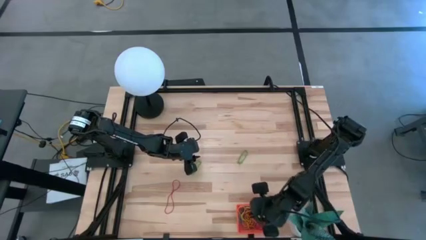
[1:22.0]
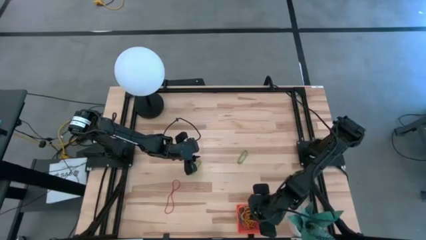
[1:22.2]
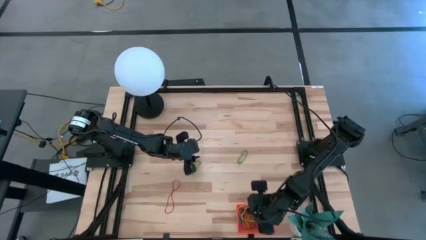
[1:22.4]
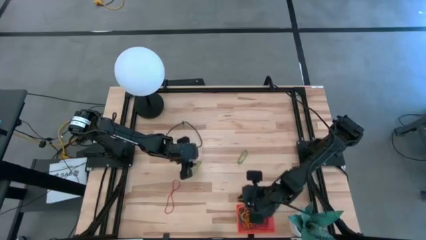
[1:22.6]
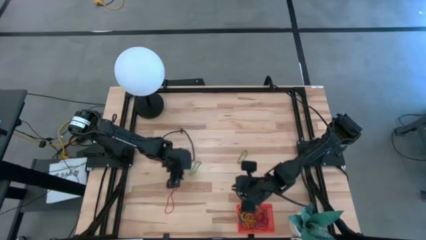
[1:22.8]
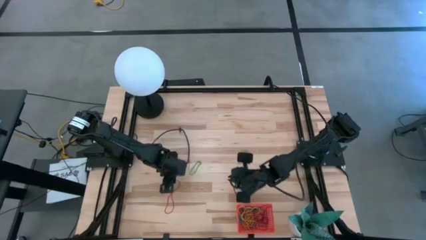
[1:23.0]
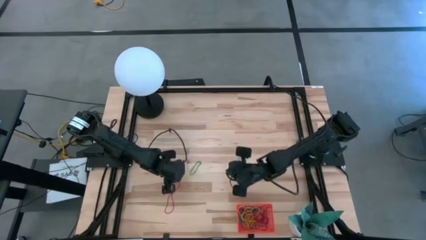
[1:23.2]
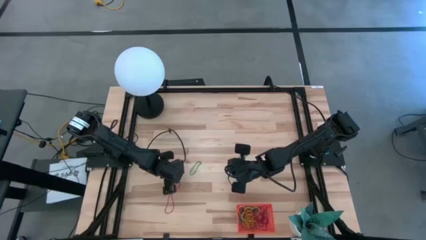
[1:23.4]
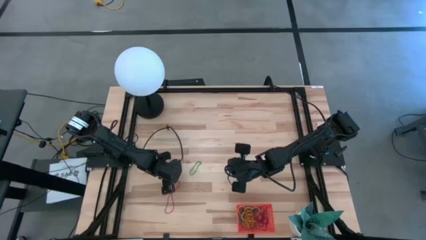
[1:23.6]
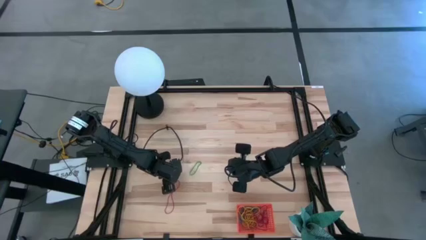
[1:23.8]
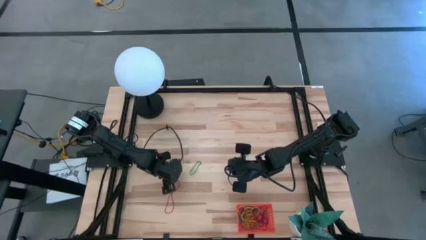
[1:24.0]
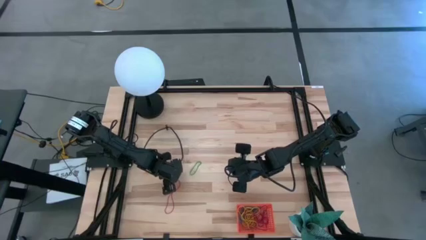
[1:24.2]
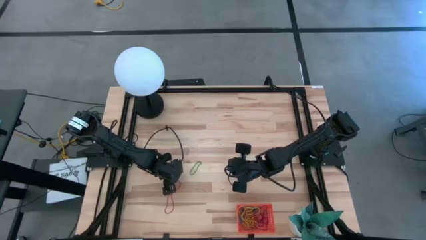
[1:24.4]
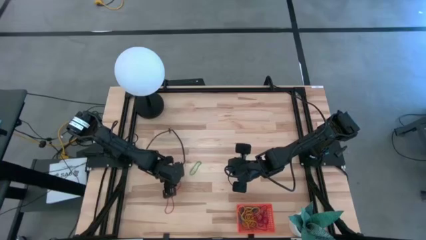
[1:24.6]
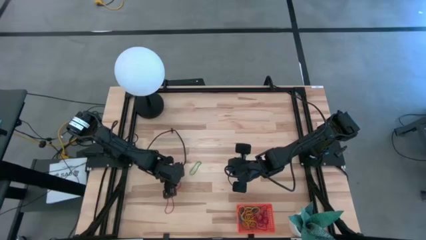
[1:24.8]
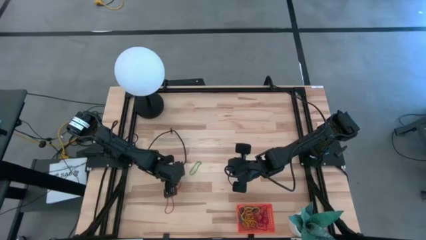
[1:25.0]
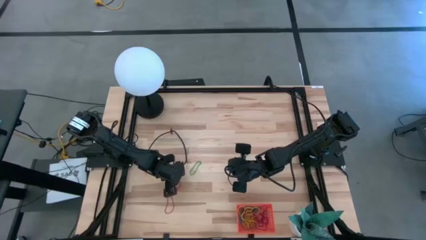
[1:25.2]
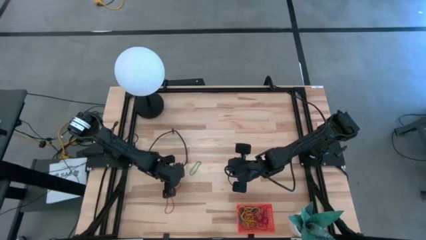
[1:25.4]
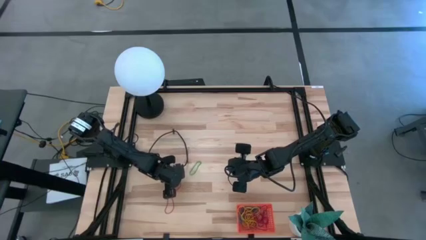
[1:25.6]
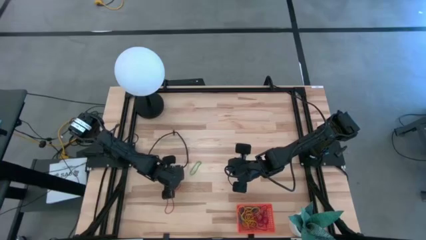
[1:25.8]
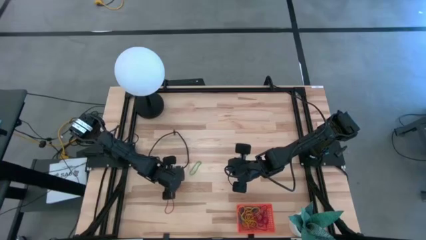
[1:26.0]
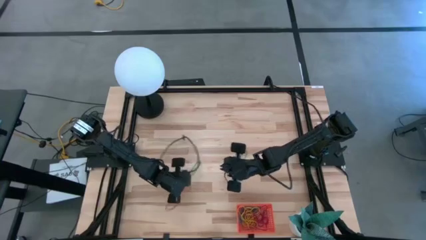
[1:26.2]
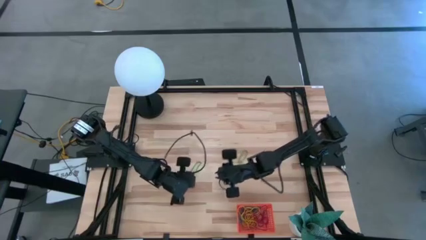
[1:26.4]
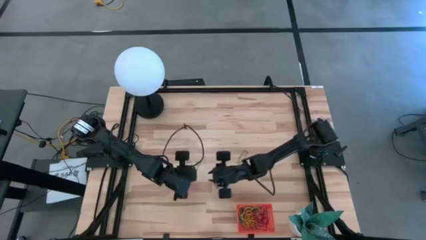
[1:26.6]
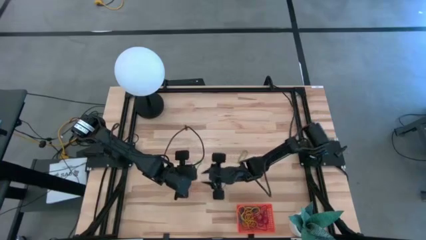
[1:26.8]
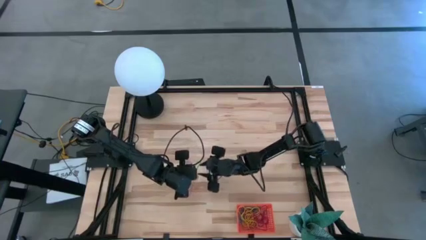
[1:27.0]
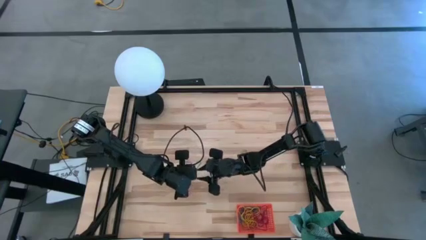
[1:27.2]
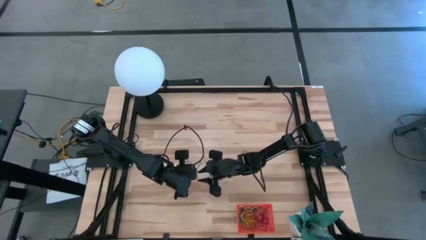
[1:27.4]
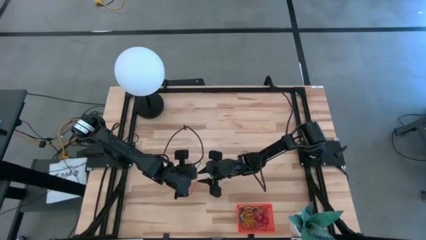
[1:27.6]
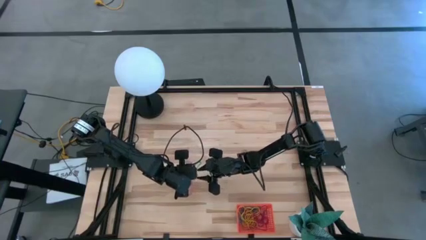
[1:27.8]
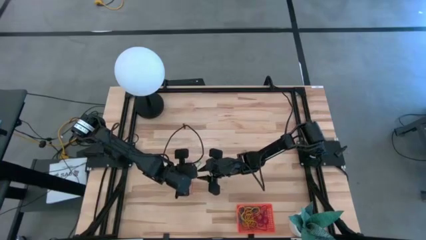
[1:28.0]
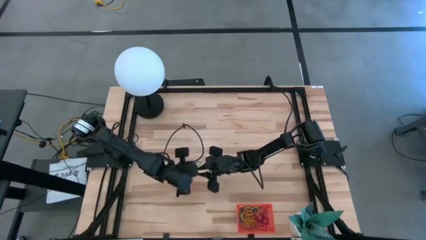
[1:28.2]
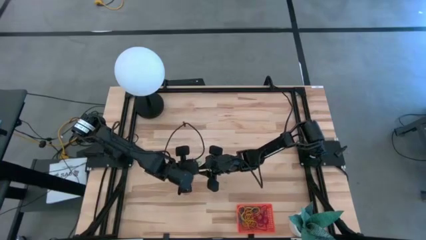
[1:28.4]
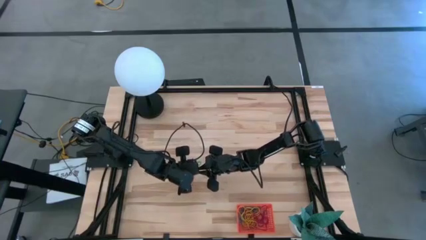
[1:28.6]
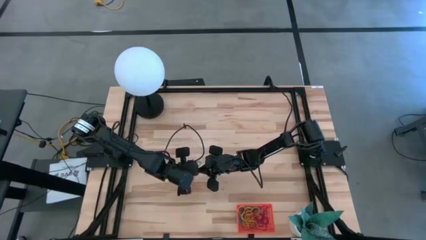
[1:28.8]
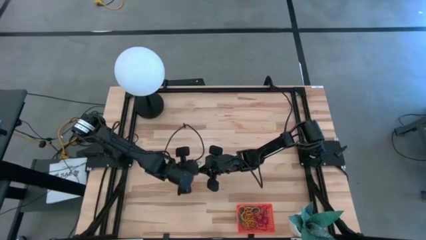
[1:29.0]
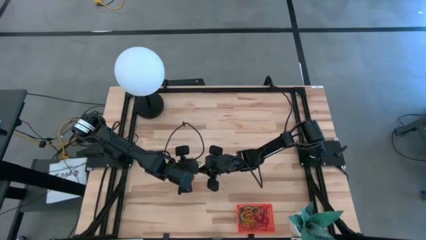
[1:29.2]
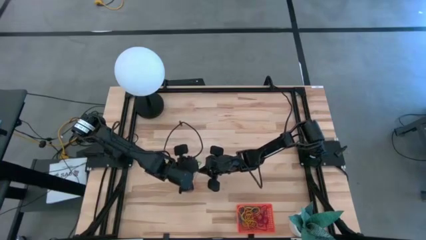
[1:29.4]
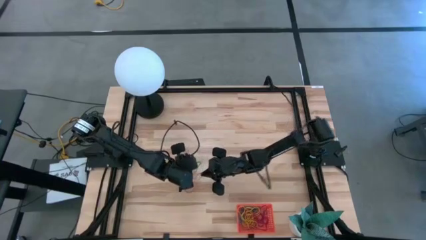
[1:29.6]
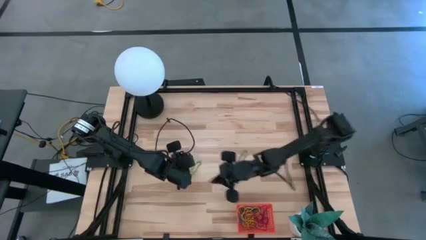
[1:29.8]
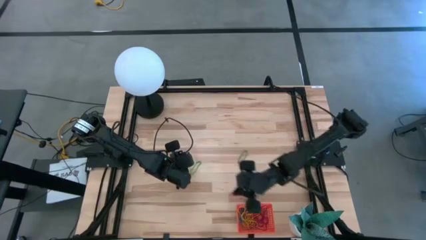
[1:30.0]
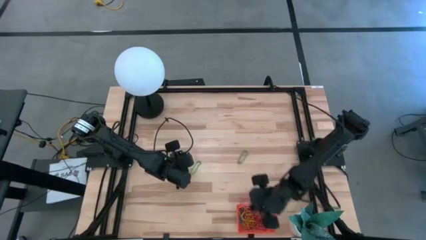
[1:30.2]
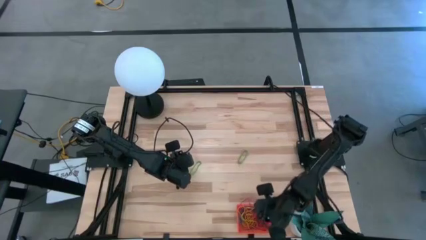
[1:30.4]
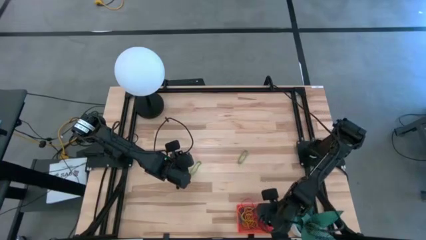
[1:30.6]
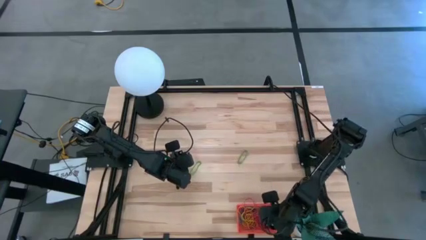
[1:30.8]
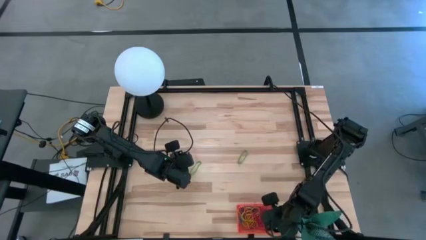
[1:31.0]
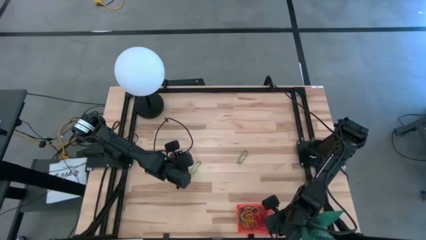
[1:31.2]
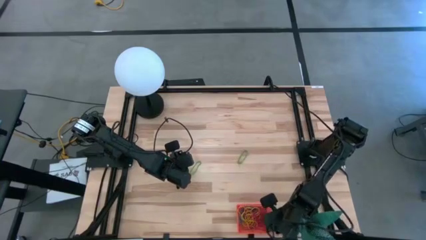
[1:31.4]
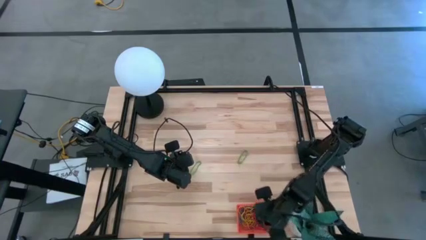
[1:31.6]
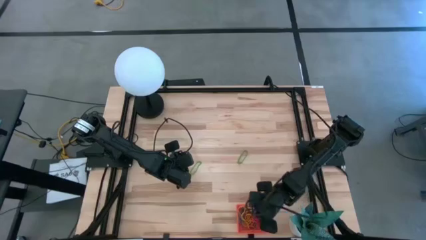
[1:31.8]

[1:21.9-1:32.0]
Task: Pick and place items into bin
Put the red rubber band into the orange bin

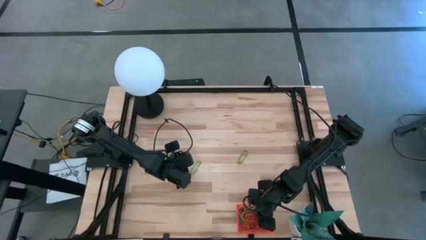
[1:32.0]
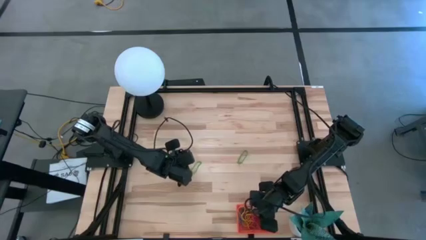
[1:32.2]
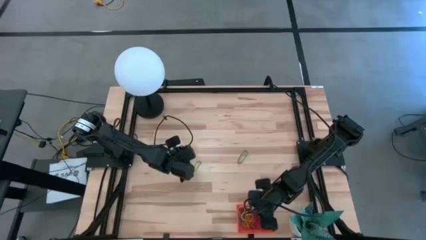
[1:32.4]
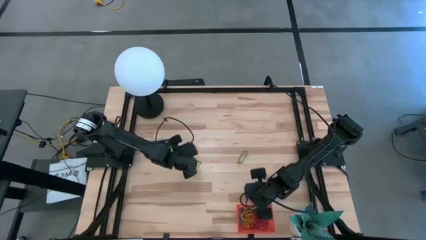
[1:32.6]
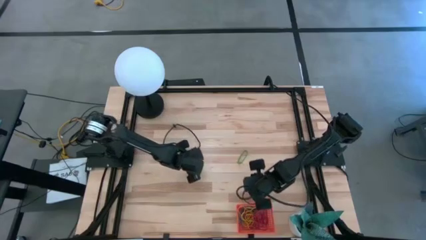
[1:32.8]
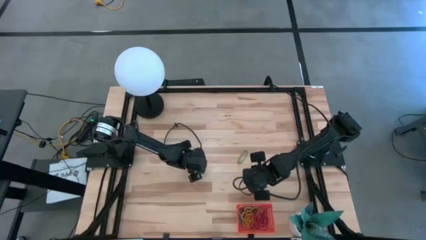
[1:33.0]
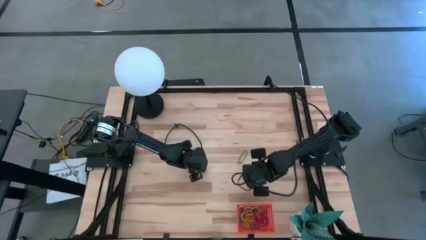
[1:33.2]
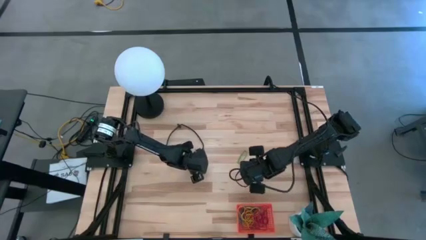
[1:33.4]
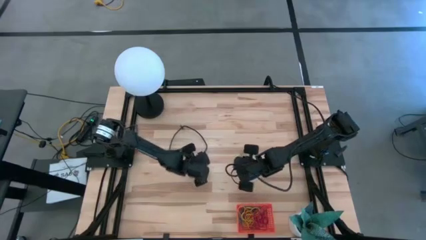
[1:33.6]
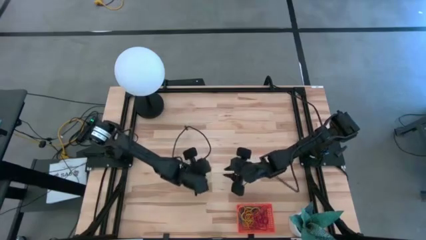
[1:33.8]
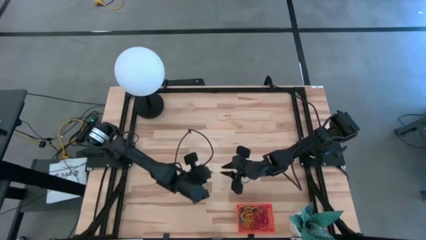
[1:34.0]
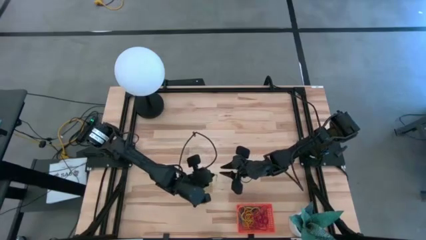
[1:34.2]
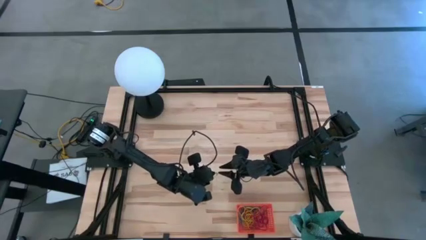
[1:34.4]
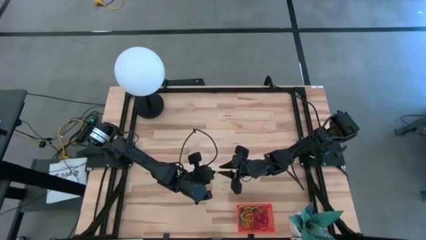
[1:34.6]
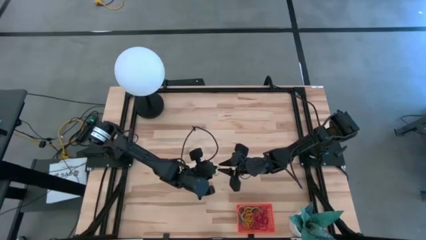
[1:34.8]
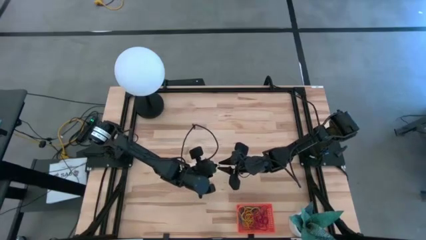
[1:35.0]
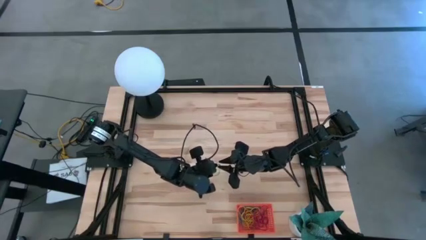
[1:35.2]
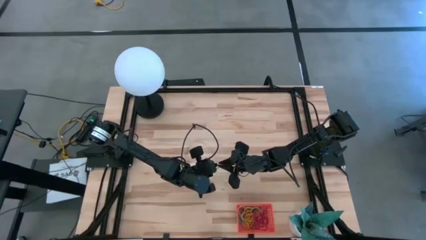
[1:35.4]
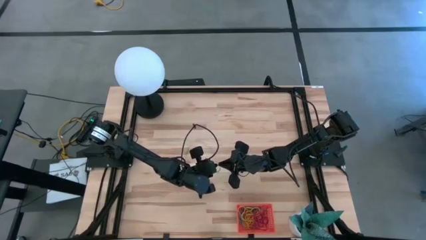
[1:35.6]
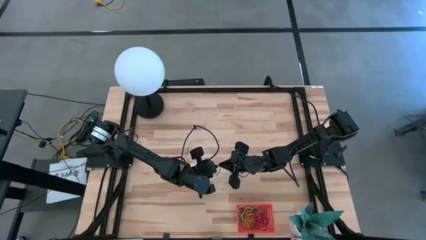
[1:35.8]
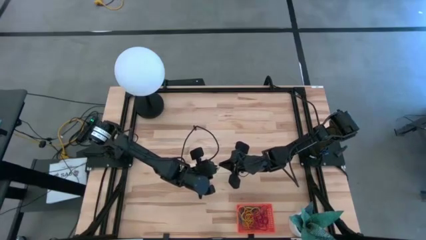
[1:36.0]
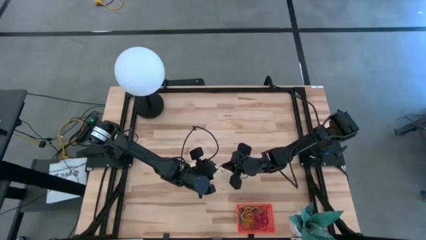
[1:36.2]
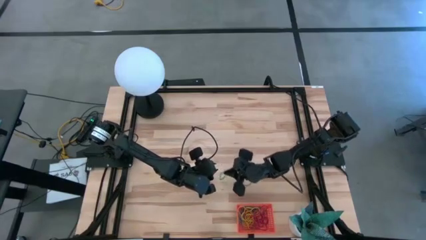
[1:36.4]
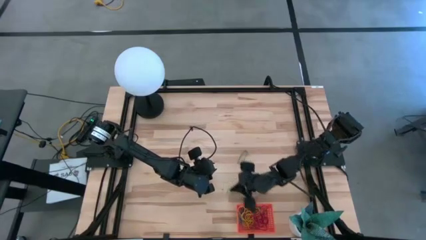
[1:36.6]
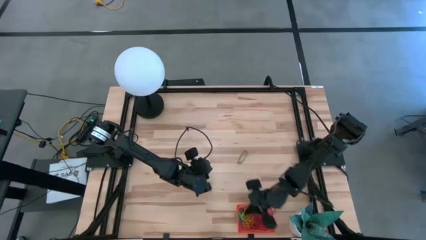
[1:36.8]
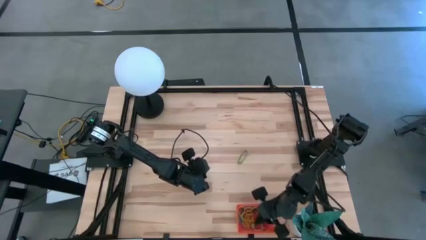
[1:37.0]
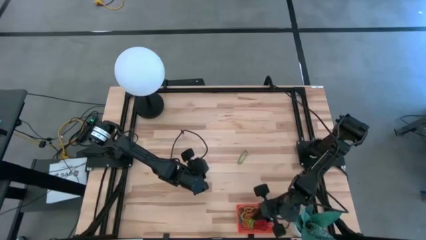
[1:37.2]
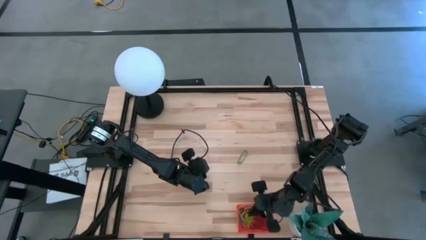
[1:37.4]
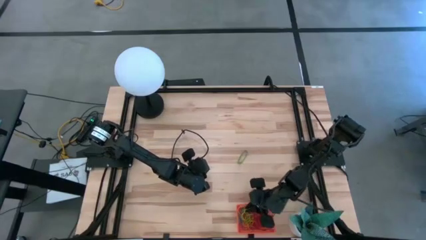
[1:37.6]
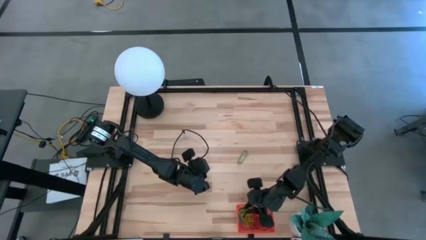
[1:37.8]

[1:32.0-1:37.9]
Put the green rubber band into the orange bin

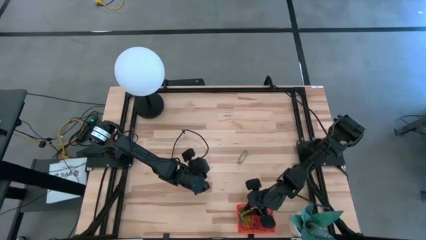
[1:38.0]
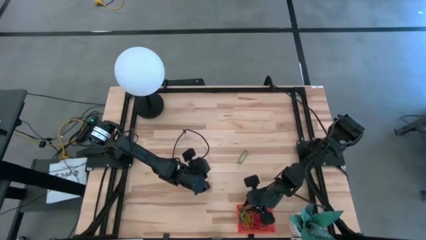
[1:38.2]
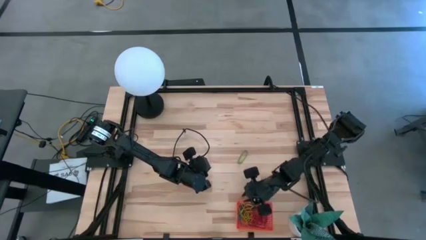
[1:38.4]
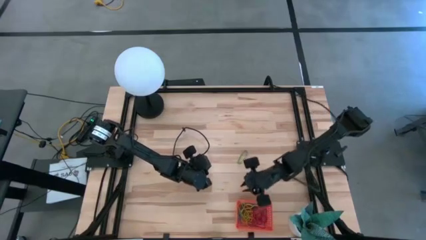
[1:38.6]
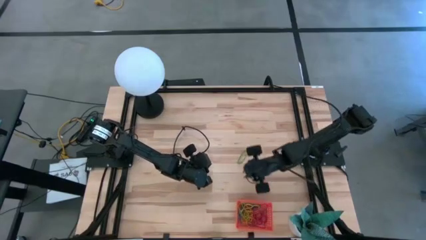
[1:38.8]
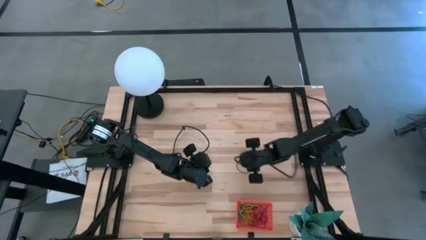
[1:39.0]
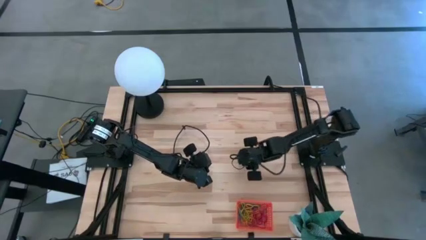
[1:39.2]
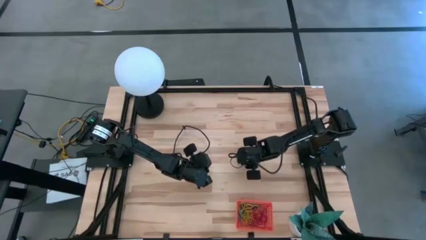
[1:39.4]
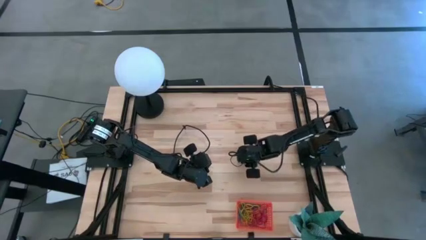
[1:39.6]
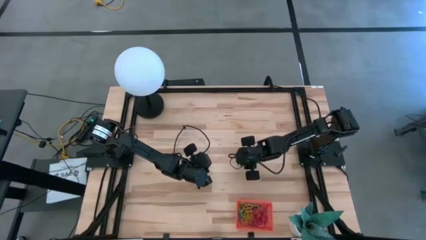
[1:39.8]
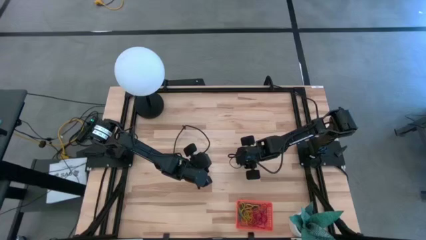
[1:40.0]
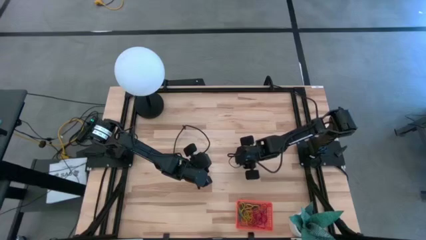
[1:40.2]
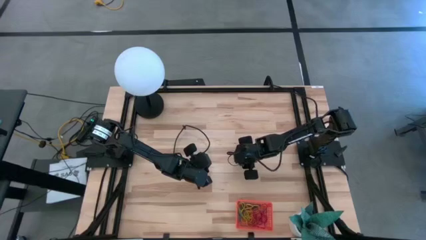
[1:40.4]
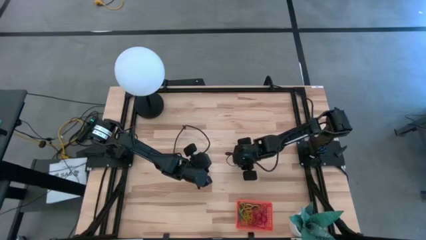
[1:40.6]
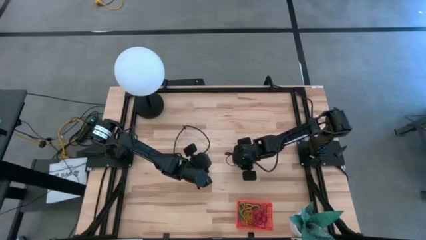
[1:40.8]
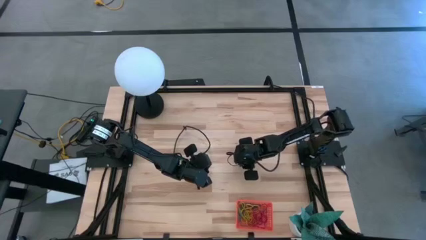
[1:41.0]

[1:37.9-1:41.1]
Put the green rubber band into the orange bin
